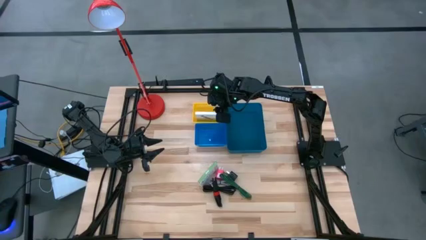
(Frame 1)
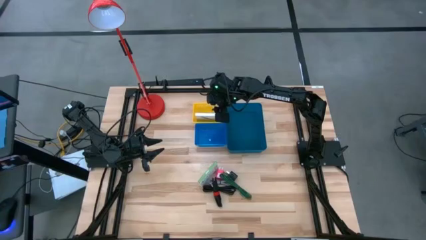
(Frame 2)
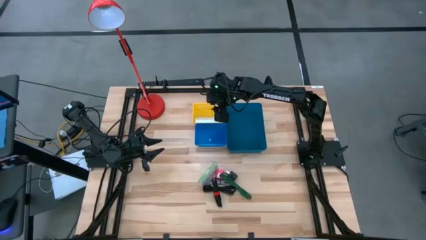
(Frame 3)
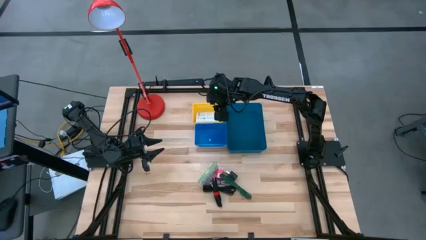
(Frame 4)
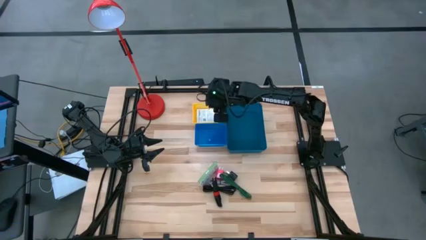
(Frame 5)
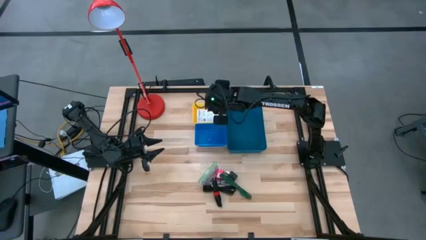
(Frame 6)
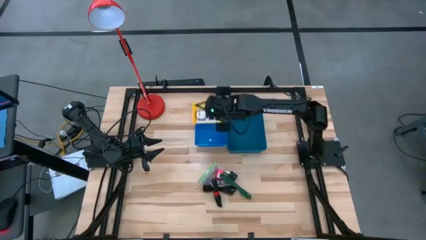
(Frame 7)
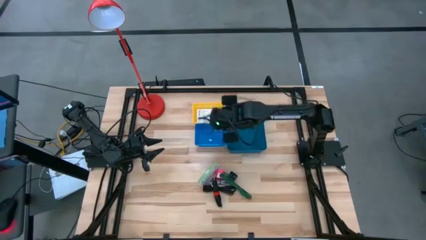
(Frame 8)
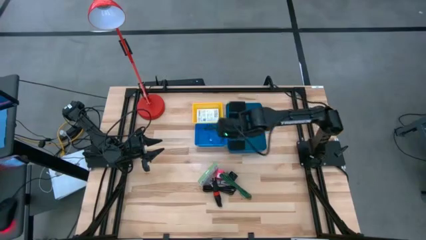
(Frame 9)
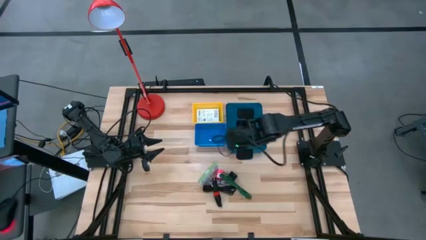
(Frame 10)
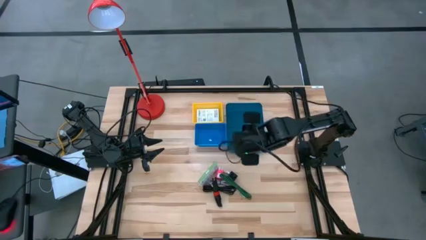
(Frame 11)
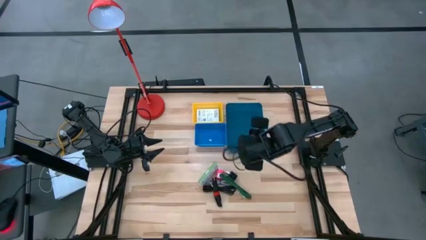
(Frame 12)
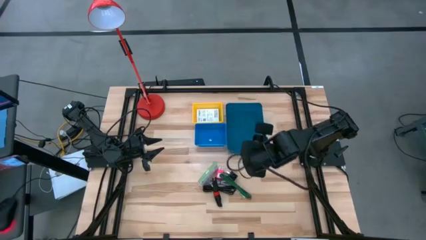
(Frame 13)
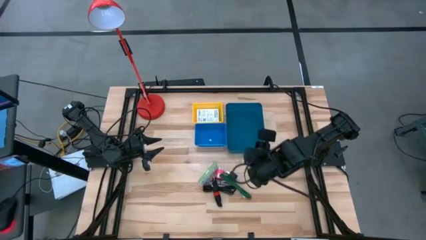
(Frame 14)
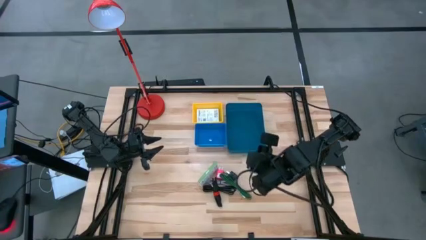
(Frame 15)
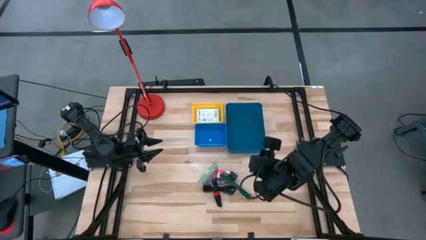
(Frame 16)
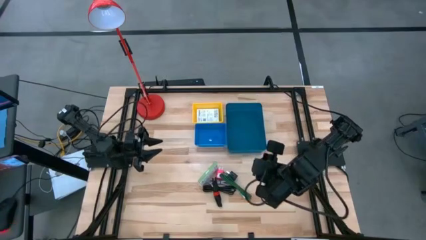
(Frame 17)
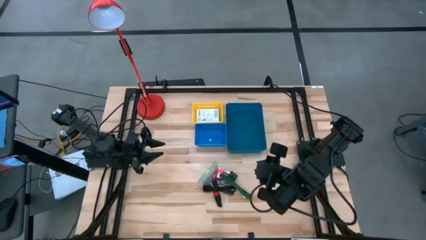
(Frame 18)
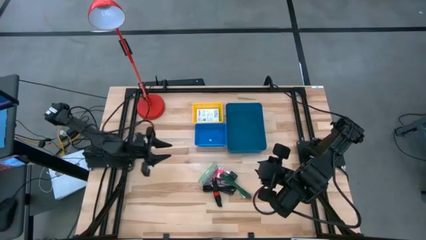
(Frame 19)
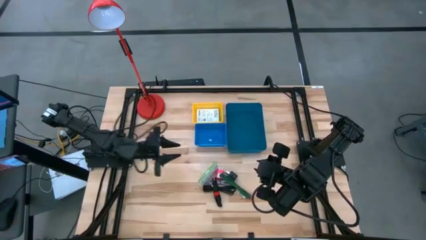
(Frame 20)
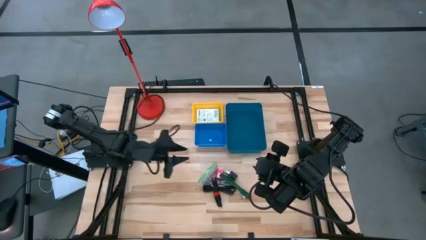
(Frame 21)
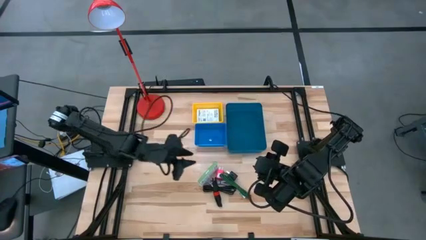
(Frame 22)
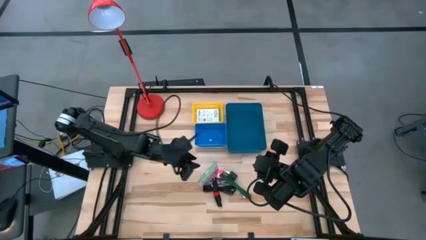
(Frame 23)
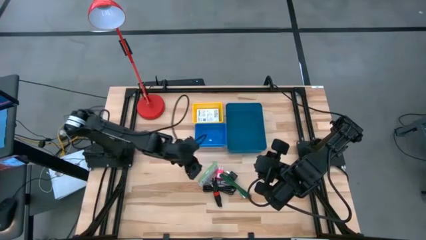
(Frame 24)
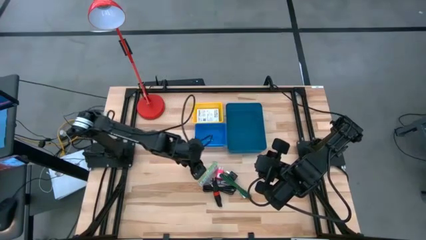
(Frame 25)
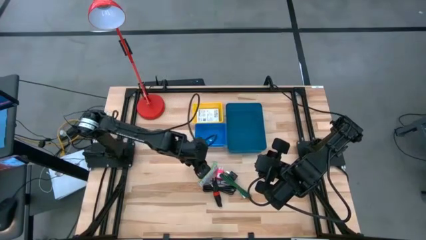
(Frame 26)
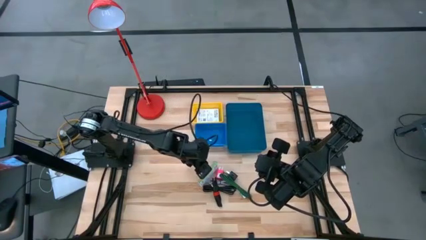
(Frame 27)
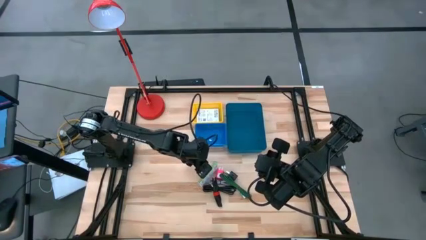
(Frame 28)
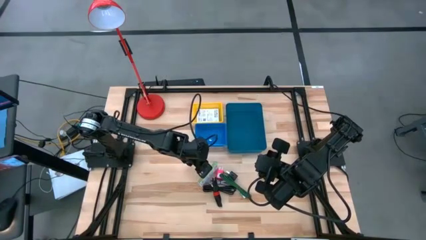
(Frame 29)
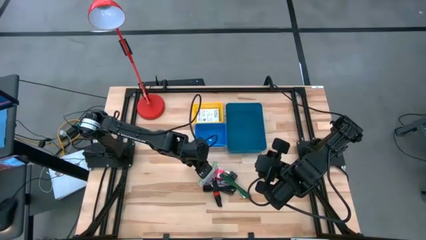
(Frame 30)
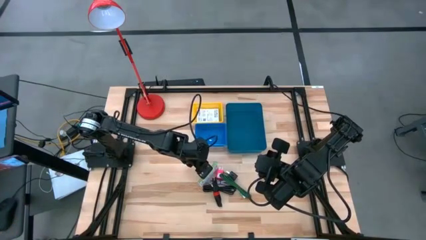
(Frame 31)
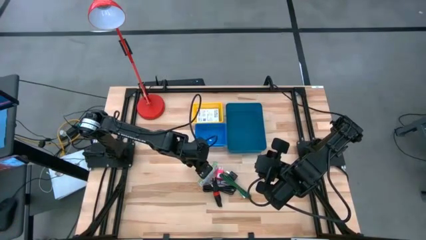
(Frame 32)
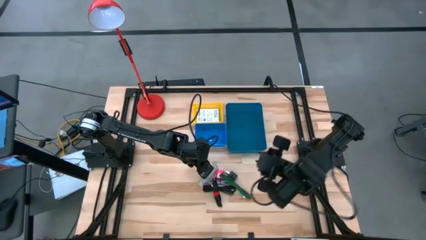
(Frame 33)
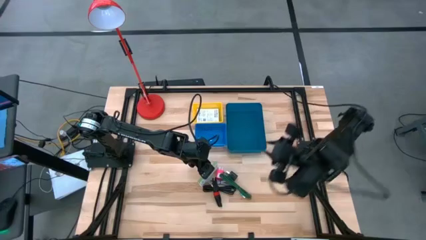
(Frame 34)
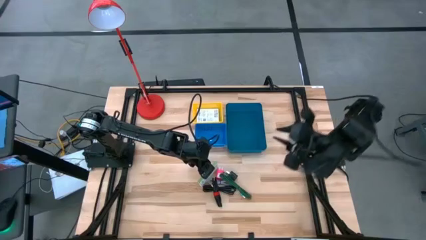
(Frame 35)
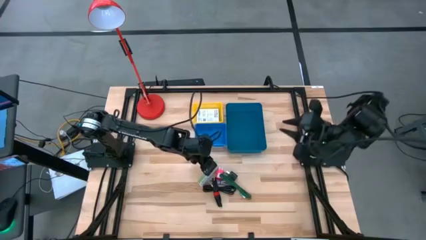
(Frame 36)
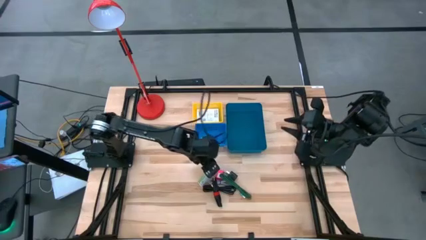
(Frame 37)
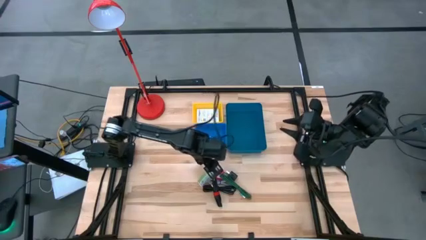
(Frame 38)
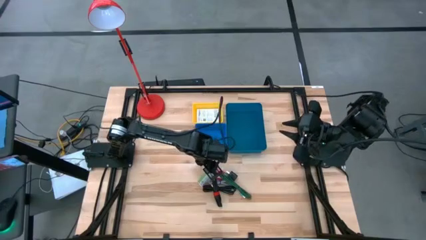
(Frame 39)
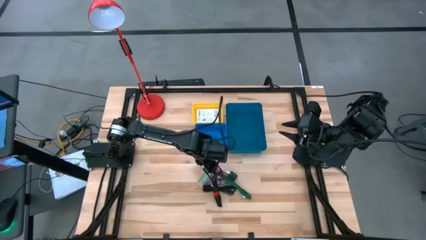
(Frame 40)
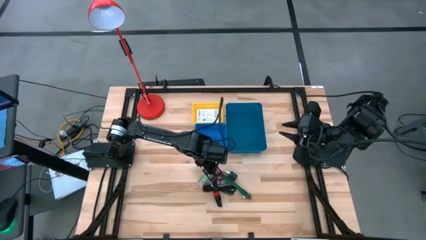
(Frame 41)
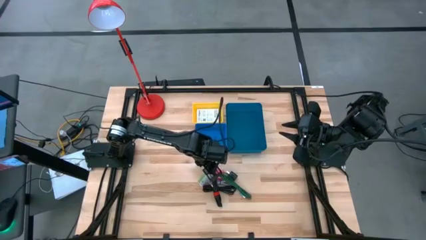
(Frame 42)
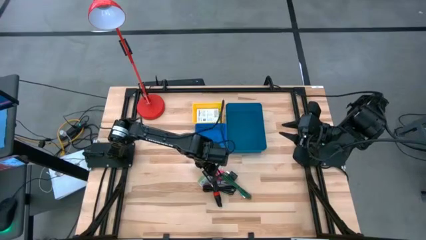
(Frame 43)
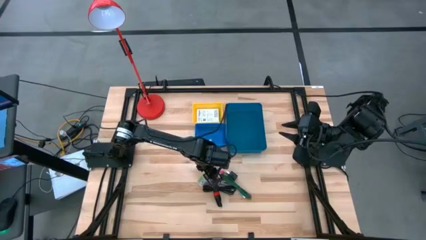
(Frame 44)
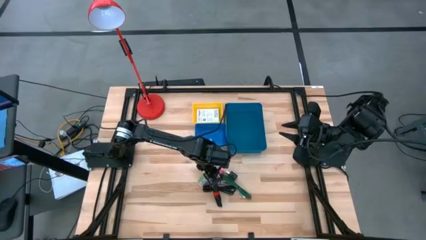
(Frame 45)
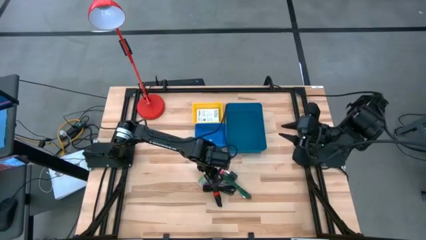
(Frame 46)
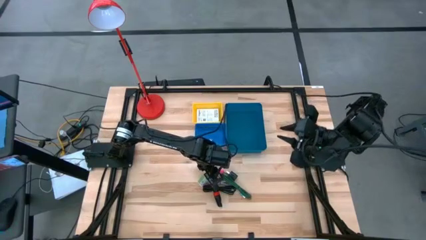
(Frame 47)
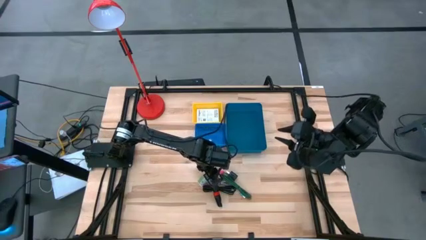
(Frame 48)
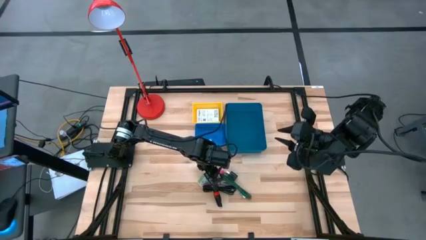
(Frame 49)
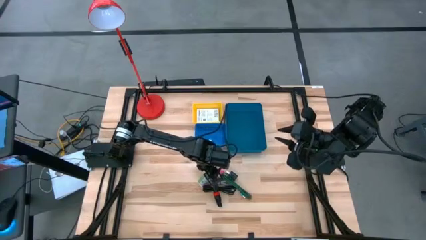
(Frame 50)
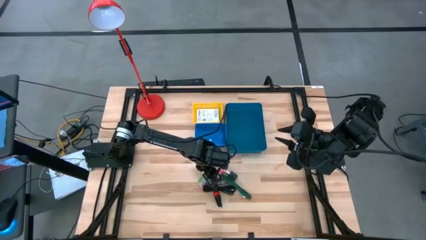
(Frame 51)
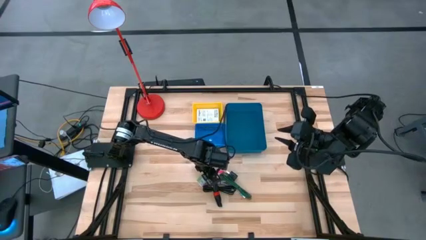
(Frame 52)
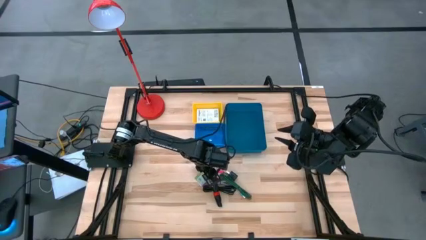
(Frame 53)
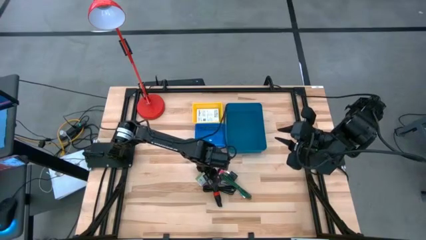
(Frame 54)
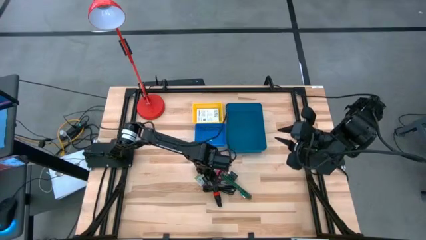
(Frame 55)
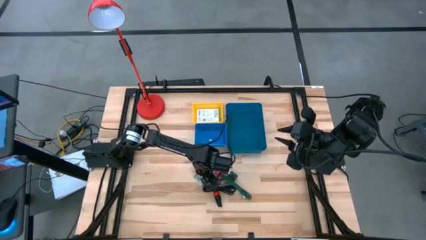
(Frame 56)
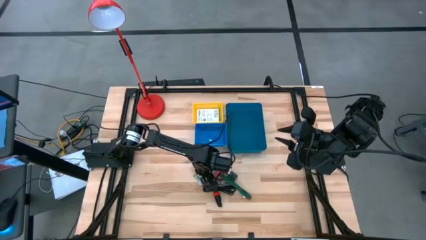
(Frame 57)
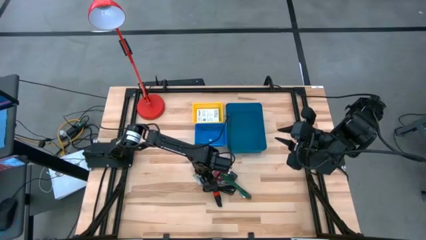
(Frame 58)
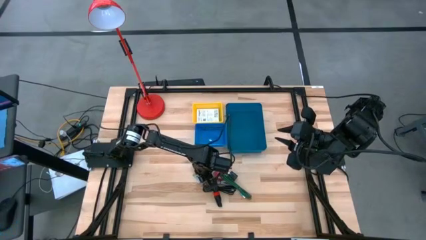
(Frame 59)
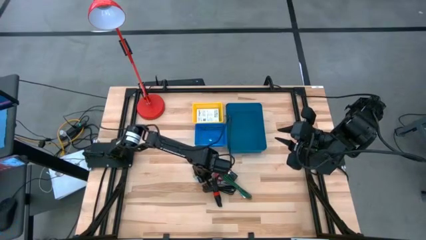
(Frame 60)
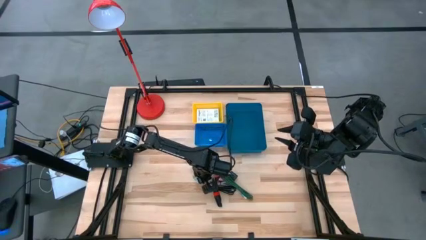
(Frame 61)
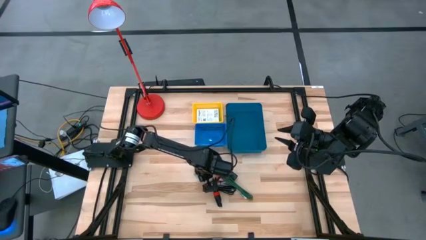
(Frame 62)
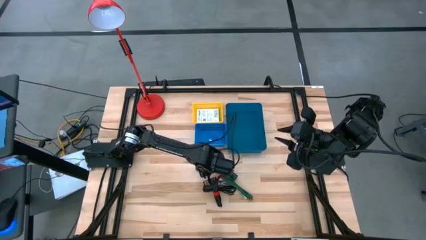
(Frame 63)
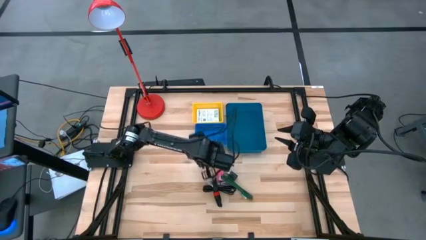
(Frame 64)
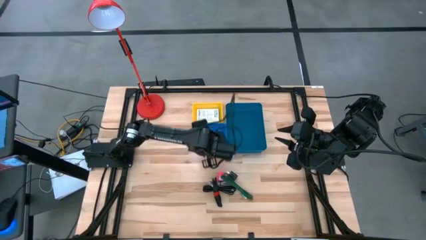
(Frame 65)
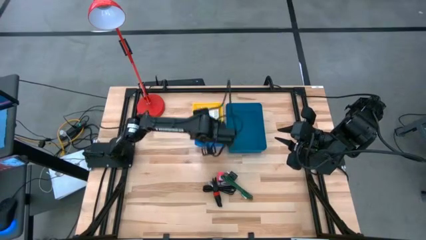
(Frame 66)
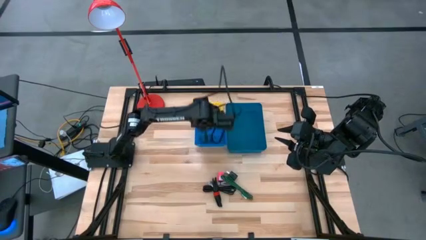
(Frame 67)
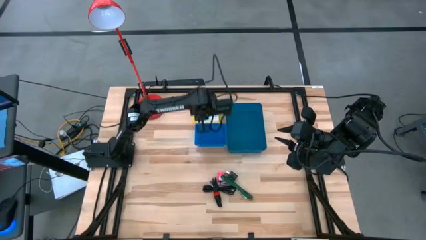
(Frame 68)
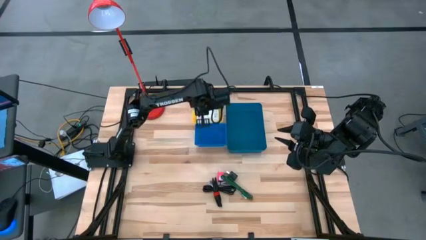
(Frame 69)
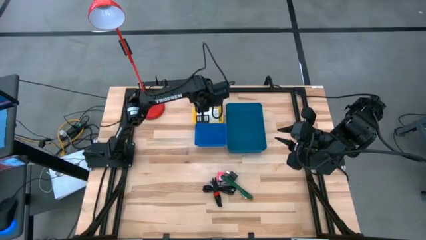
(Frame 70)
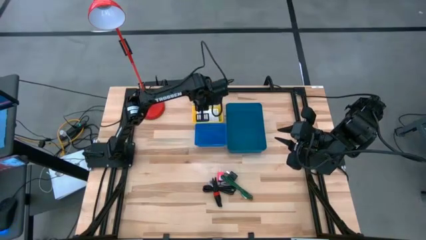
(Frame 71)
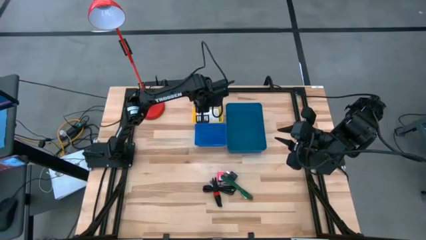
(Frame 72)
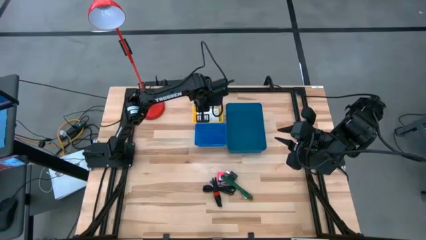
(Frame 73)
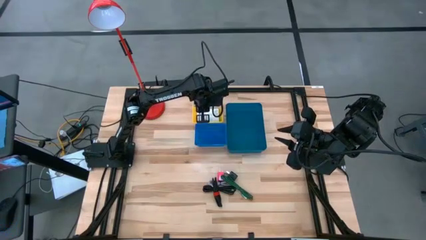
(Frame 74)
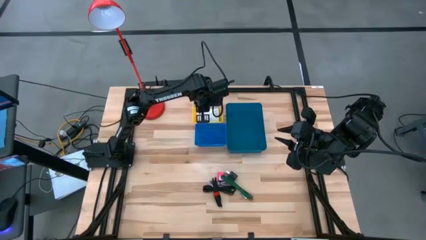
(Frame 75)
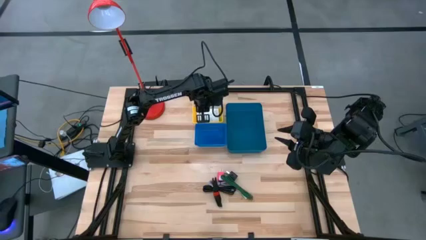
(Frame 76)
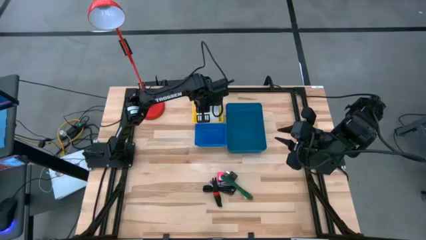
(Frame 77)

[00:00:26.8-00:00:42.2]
Task: Pick and place items into bin
Put the card reader box into the yellow bin
